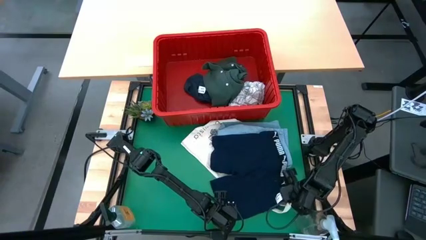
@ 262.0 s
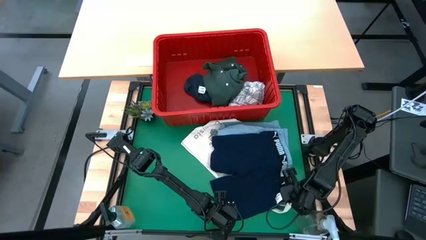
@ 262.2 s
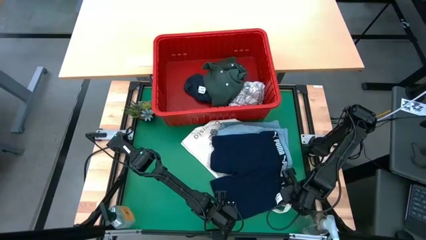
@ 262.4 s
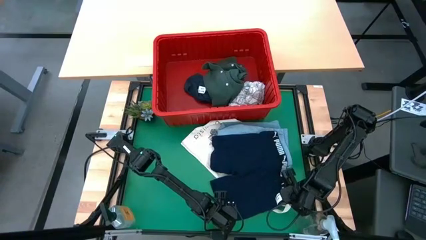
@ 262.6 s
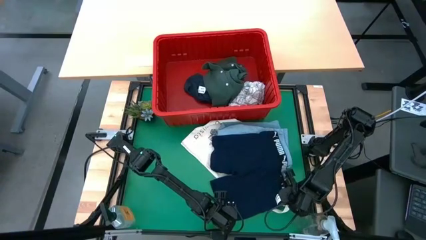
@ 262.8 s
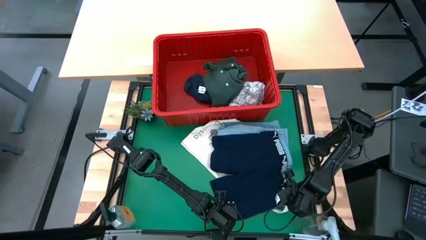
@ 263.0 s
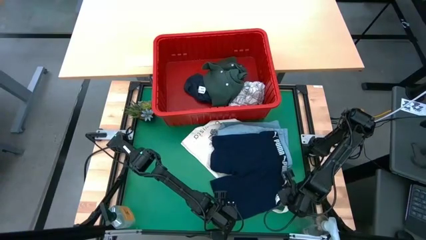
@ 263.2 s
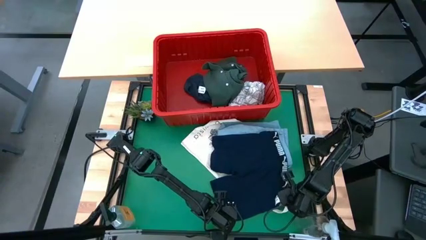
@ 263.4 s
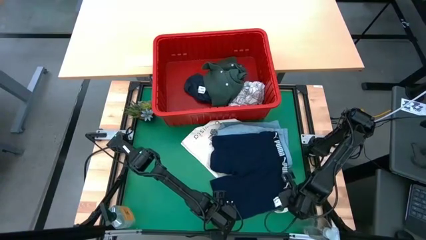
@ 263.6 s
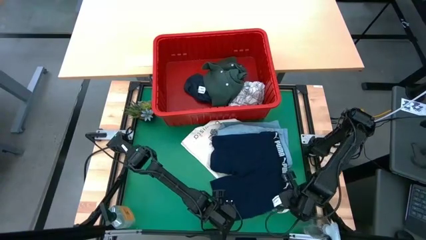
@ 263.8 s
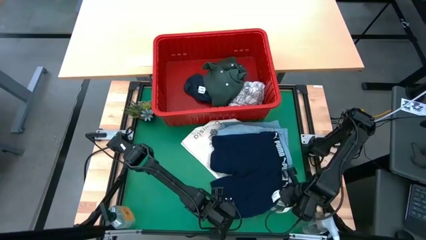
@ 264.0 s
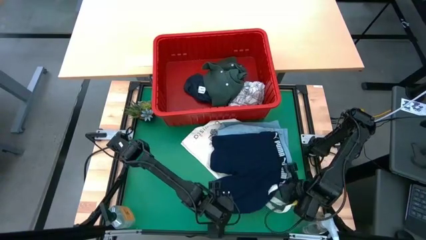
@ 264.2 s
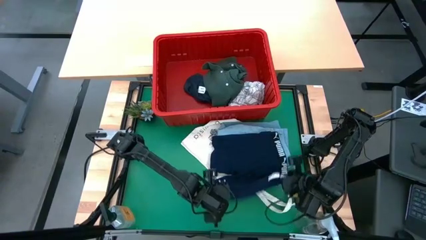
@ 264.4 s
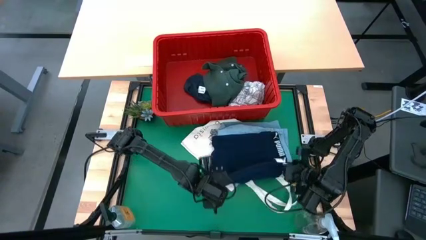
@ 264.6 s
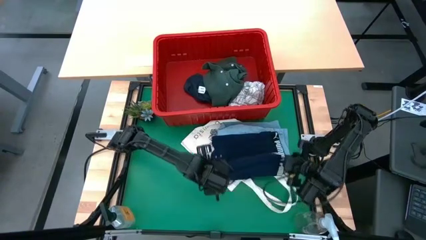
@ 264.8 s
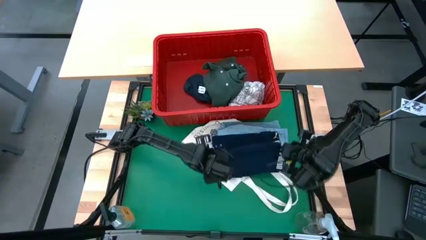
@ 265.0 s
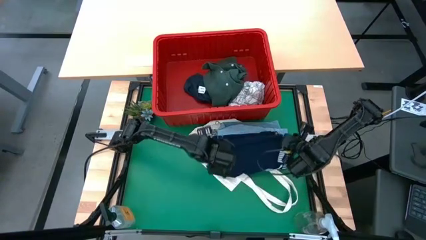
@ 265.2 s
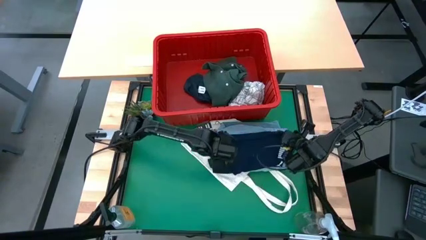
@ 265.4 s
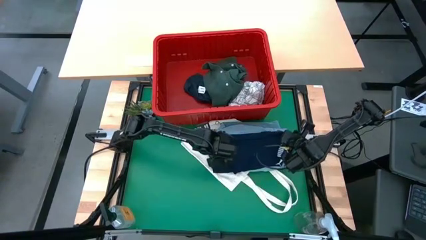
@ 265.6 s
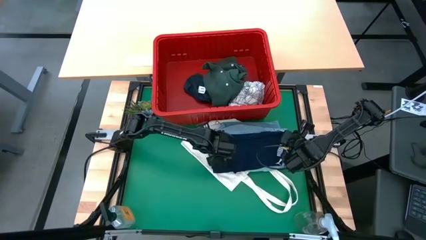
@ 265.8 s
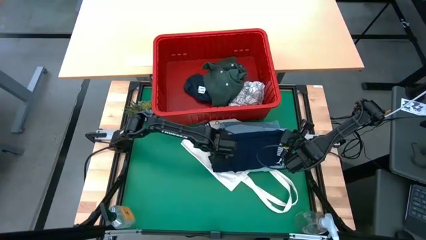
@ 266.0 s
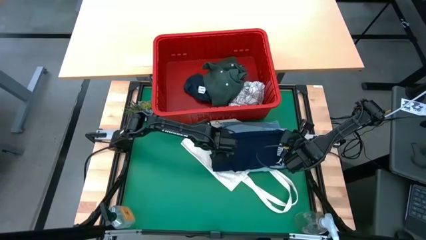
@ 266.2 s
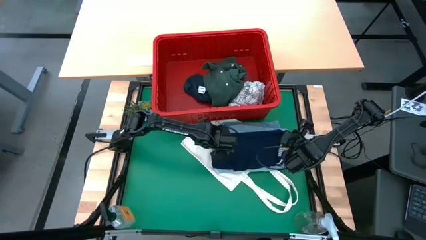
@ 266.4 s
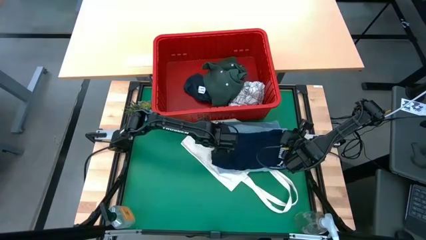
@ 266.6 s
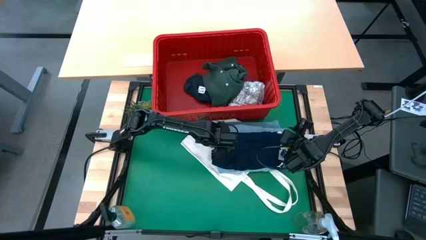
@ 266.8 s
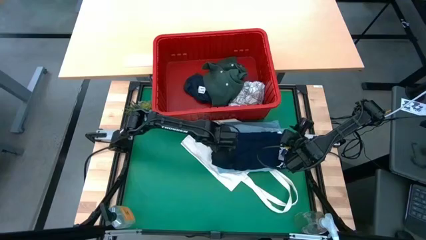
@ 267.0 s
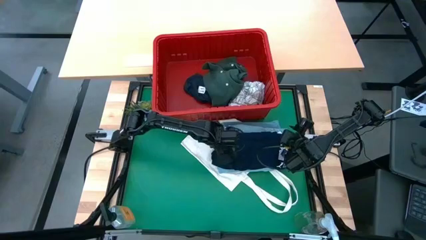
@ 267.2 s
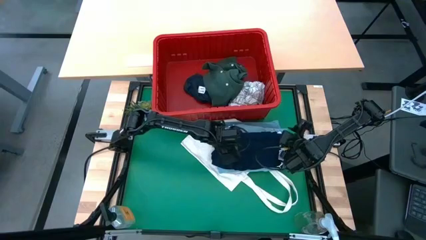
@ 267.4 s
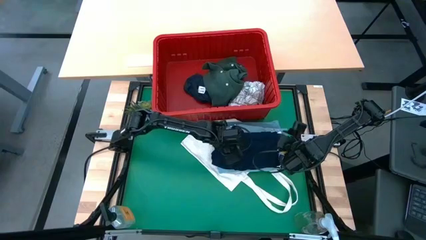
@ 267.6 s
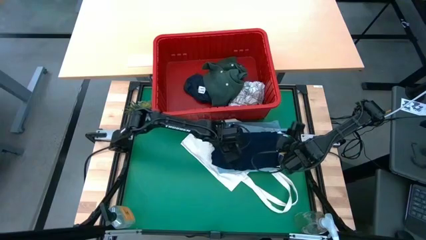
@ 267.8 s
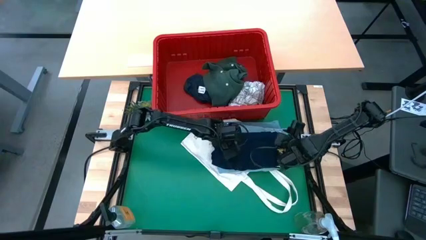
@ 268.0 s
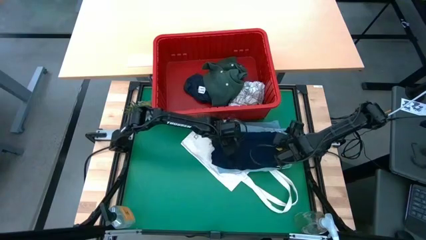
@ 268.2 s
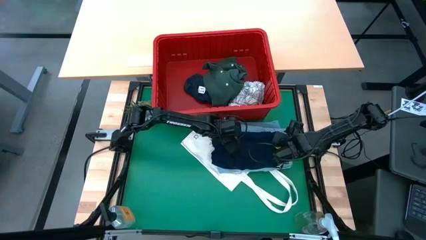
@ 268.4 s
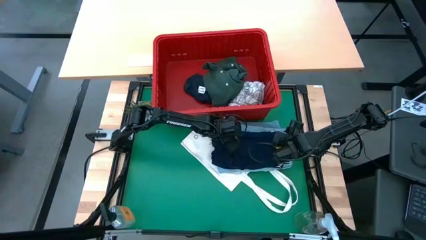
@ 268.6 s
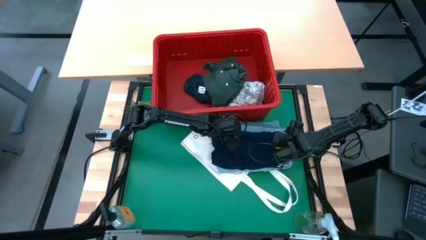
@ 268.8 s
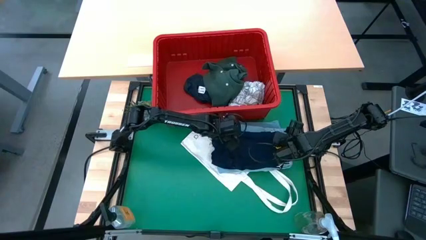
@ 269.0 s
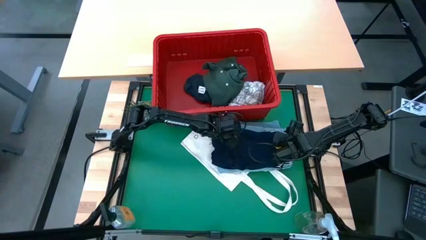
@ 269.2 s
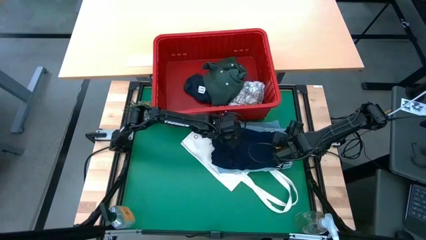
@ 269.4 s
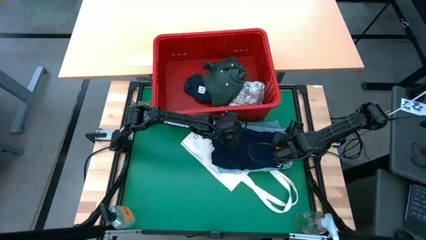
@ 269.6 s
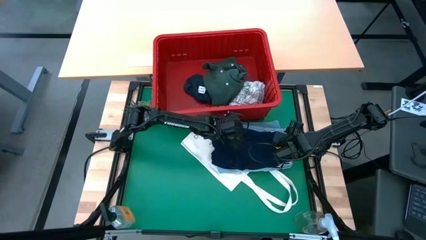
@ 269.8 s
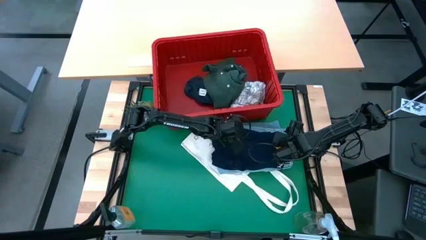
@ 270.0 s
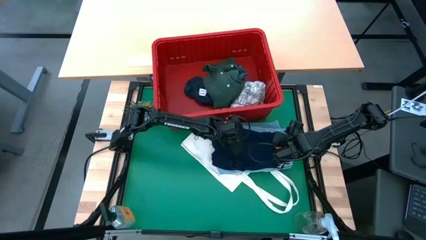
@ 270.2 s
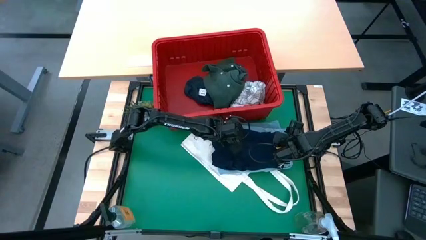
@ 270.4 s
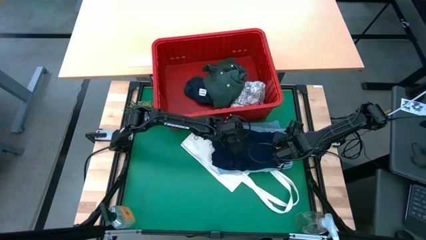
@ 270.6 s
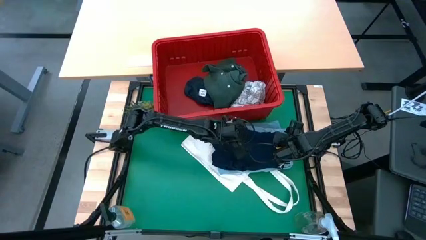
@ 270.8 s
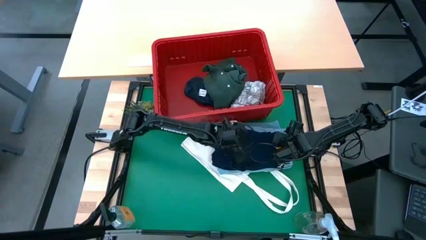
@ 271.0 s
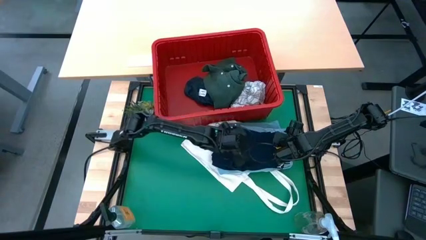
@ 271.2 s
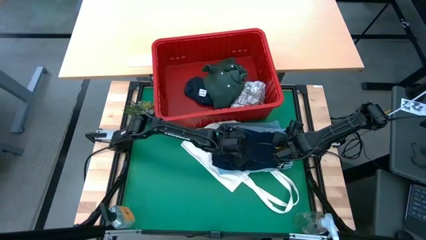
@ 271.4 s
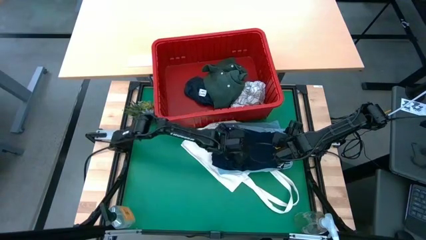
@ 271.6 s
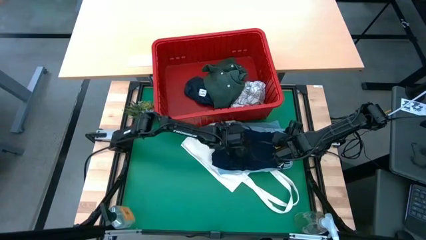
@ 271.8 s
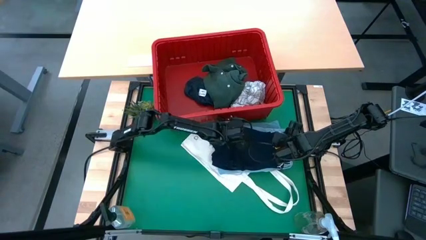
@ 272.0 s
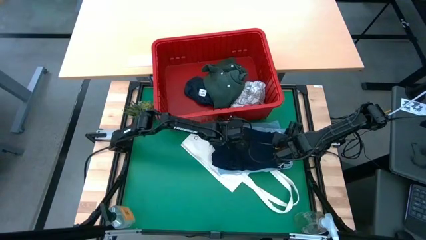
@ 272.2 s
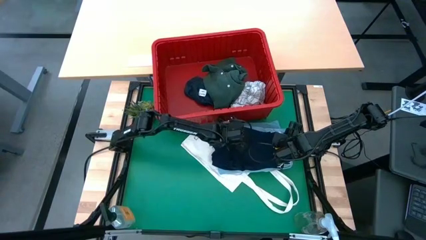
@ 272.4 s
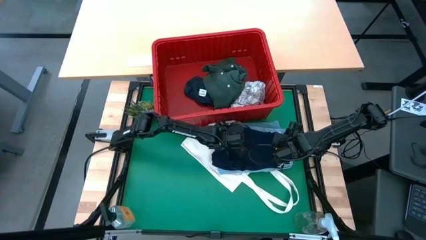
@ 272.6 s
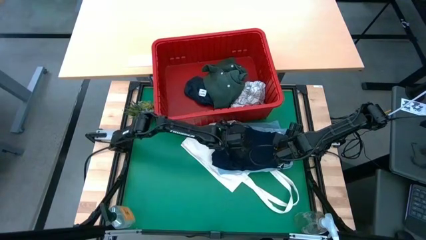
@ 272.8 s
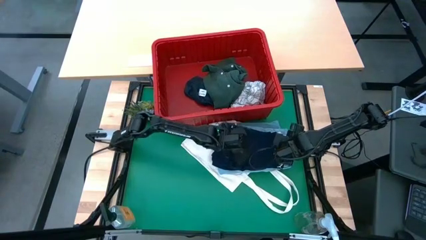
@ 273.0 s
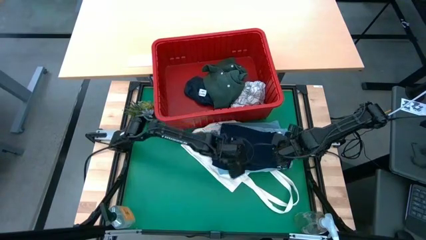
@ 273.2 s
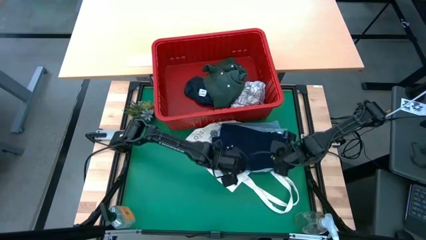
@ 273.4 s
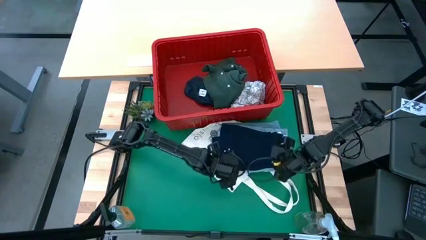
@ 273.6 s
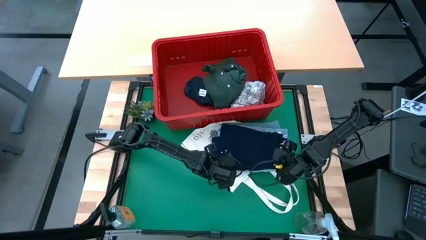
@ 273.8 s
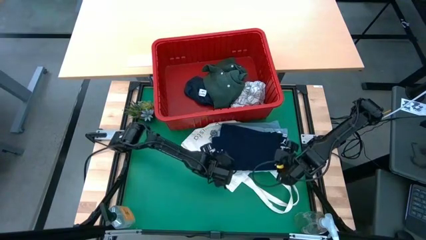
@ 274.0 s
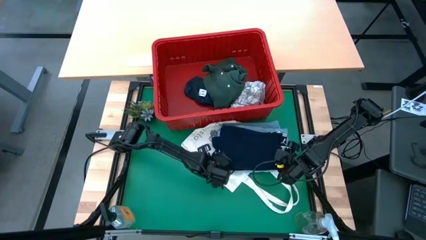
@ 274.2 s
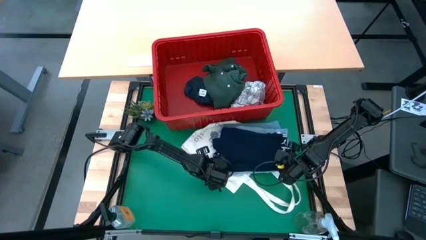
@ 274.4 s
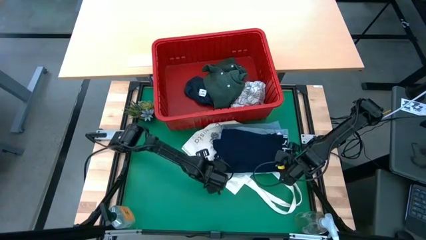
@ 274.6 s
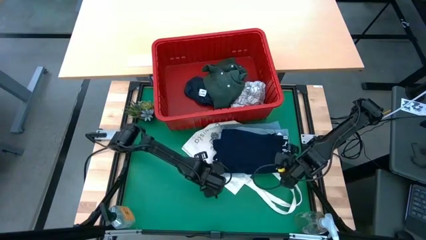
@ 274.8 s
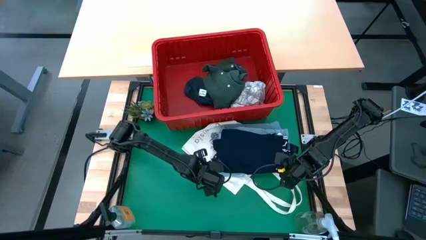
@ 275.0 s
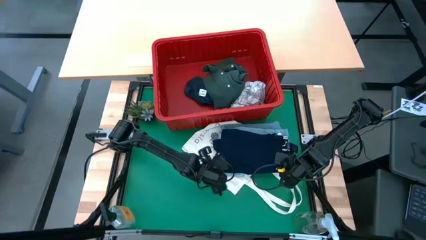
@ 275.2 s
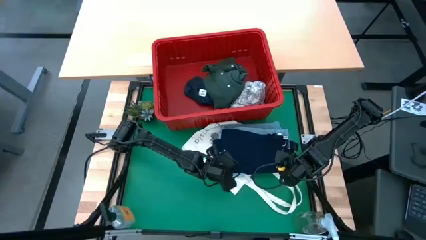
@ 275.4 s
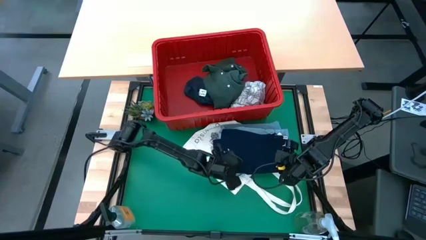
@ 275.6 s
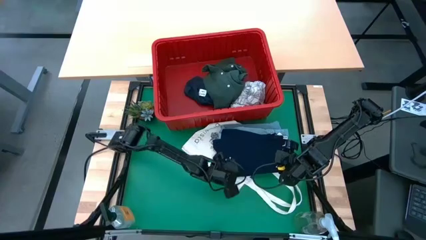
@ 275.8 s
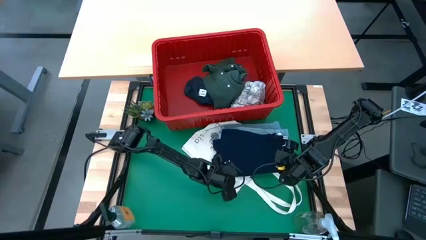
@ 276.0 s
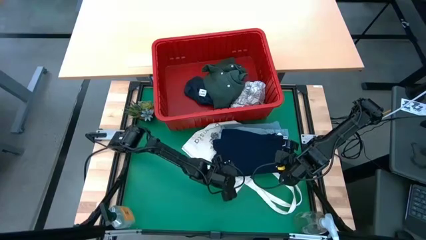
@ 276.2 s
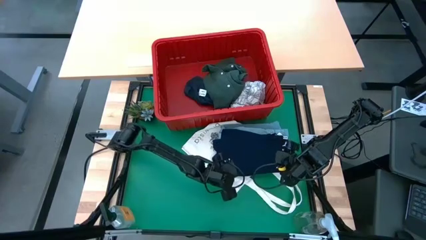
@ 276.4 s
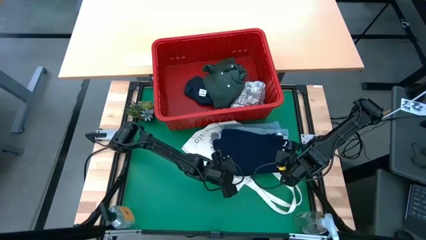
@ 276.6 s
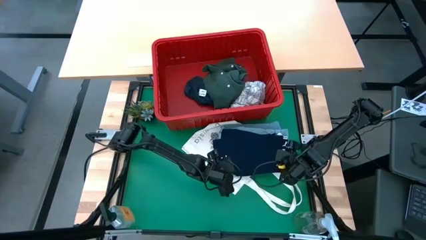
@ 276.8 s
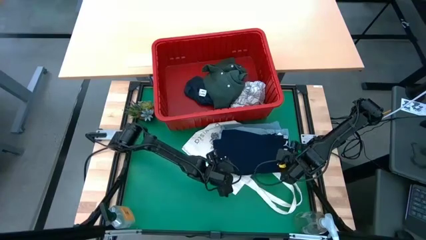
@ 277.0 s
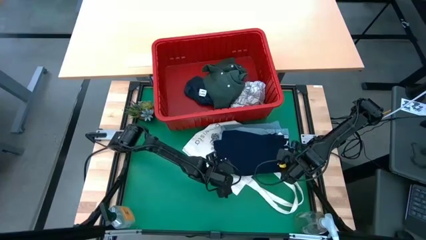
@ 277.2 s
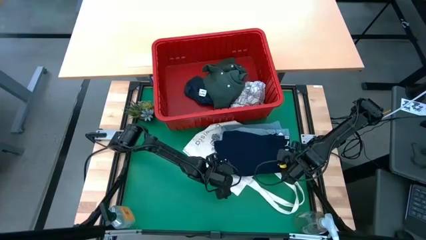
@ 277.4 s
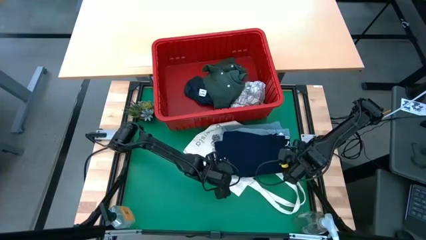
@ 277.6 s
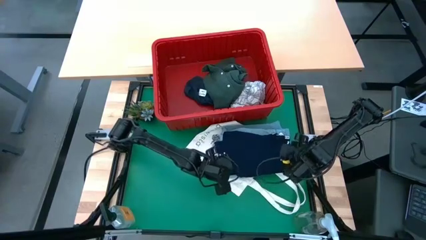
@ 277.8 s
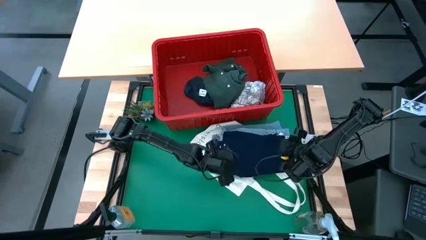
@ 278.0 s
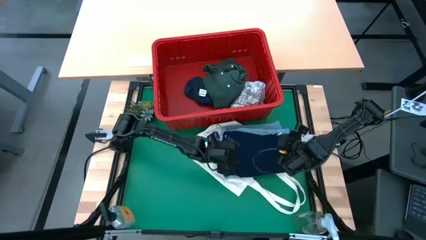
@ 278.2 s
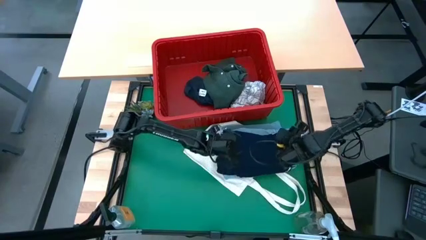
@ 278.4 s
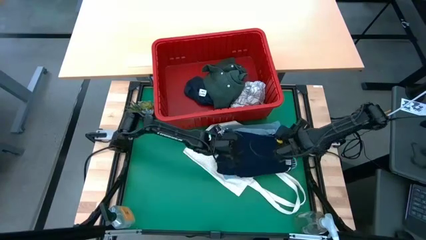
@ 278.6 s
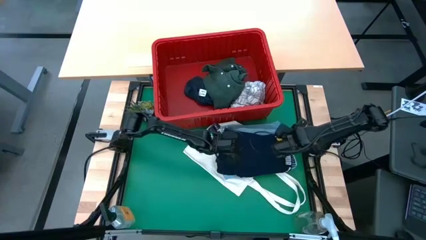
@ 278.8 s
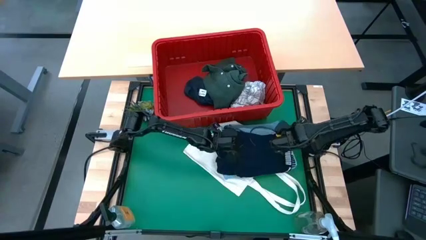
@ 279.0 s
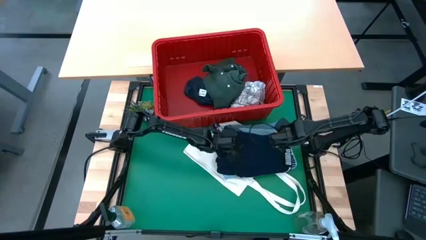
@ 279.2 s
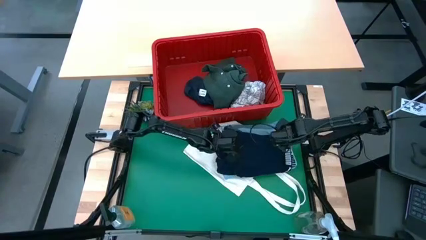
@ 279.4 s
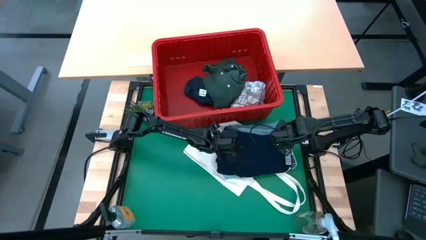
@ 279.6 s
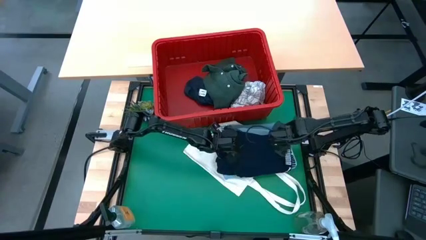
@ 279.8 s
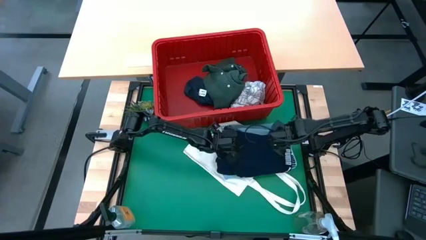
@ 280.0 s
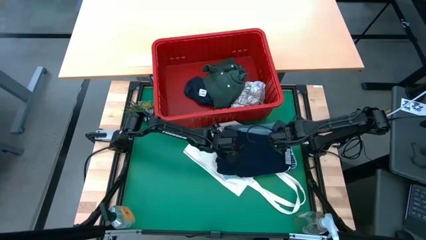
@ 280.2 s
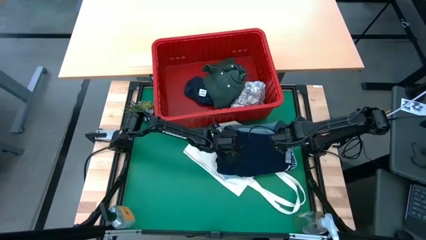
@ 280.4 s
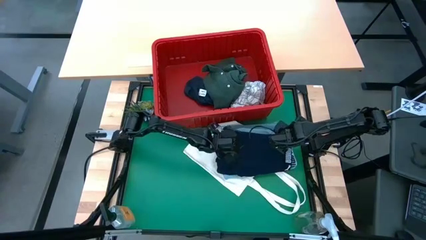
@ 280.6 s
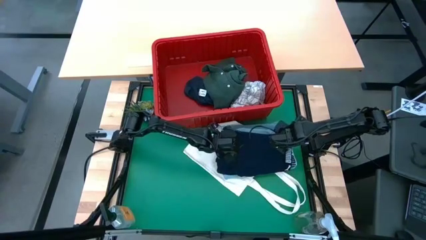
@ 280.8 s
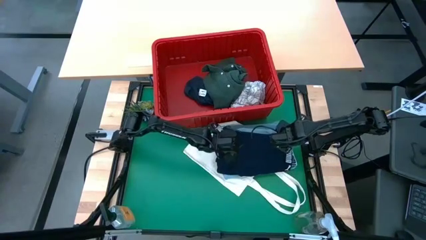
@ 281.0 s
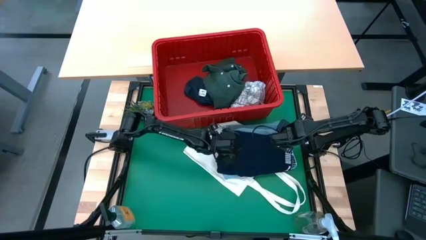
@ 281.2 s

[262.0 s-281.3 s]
Task: Fold laundry
Fold the dark blue boxer
